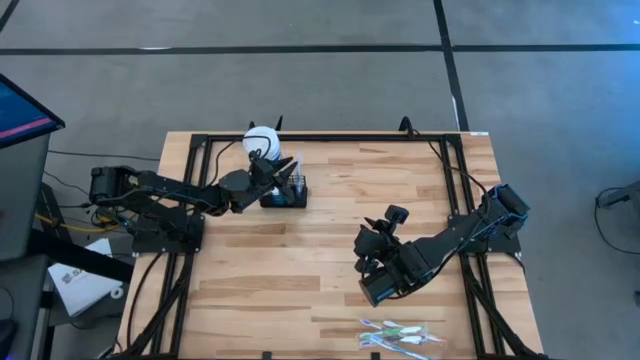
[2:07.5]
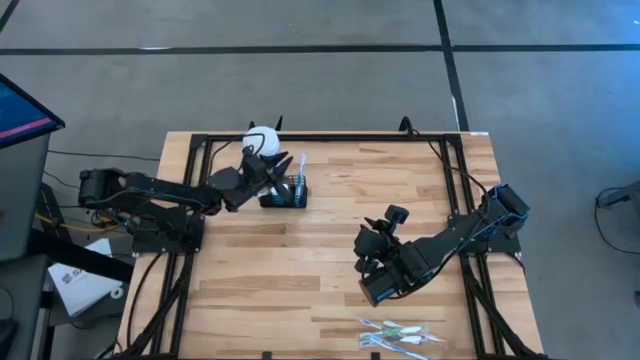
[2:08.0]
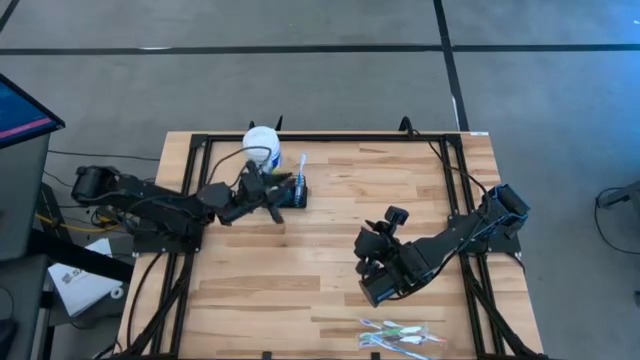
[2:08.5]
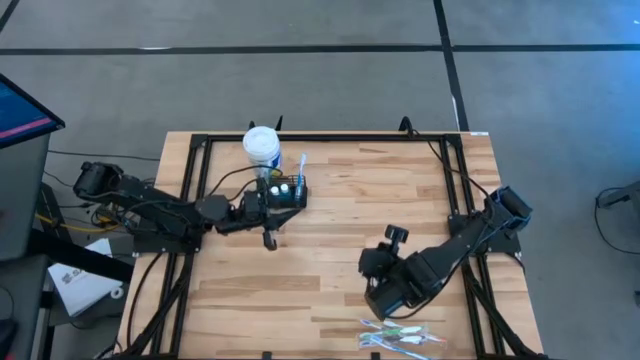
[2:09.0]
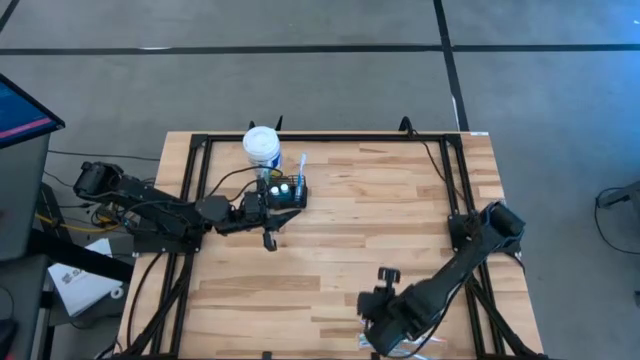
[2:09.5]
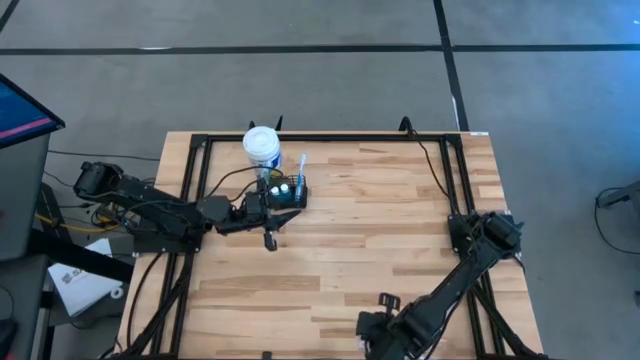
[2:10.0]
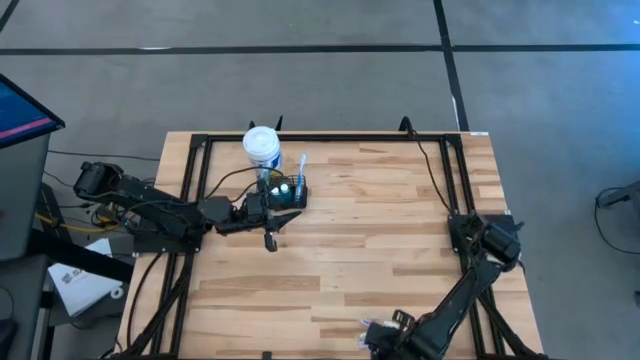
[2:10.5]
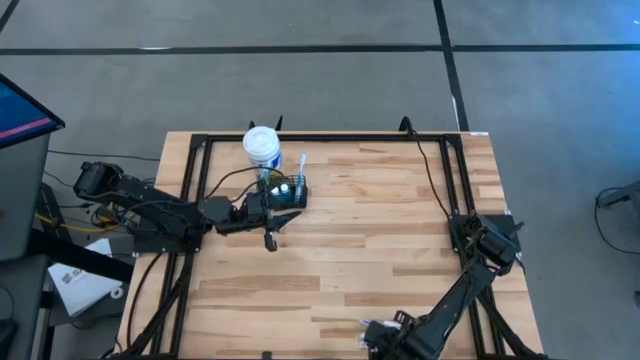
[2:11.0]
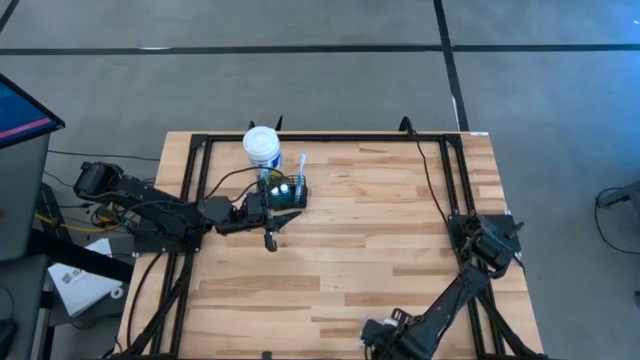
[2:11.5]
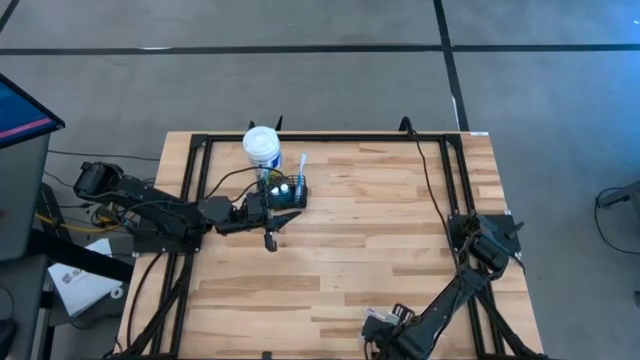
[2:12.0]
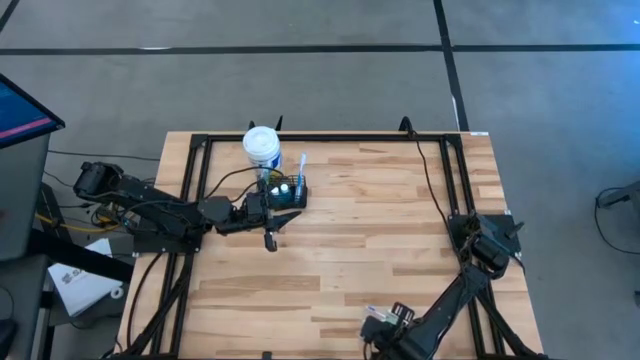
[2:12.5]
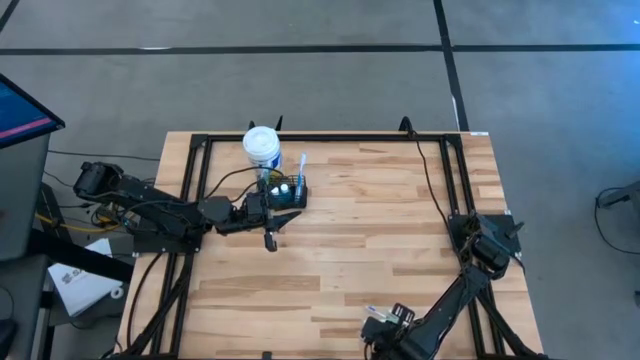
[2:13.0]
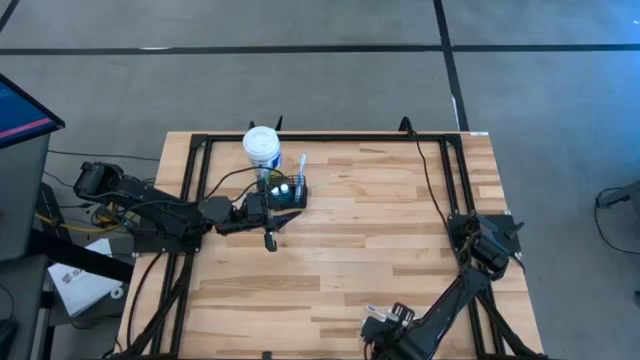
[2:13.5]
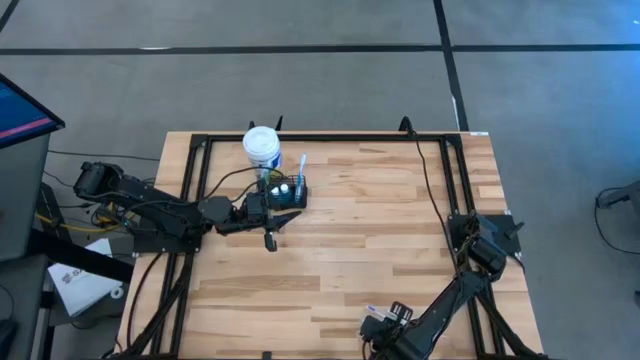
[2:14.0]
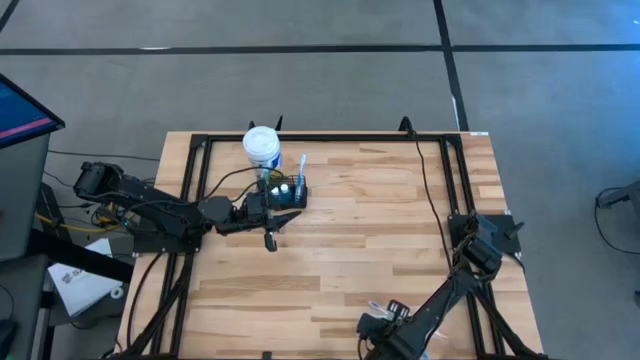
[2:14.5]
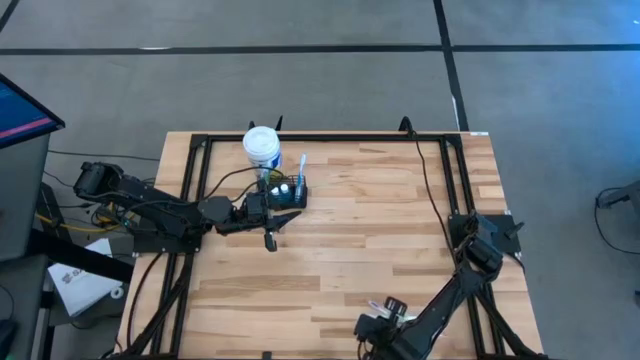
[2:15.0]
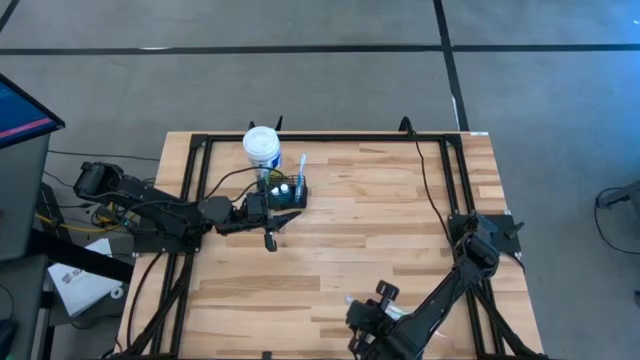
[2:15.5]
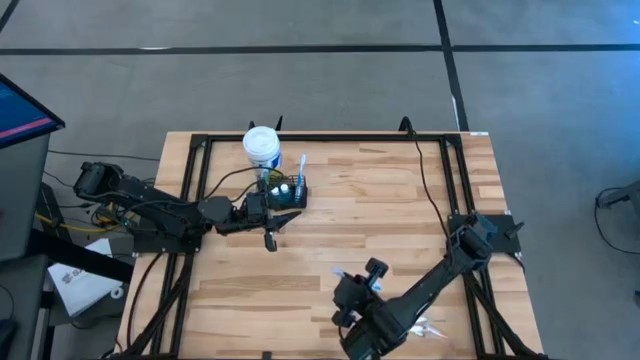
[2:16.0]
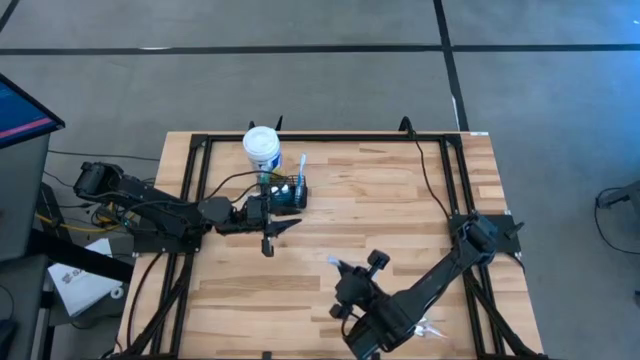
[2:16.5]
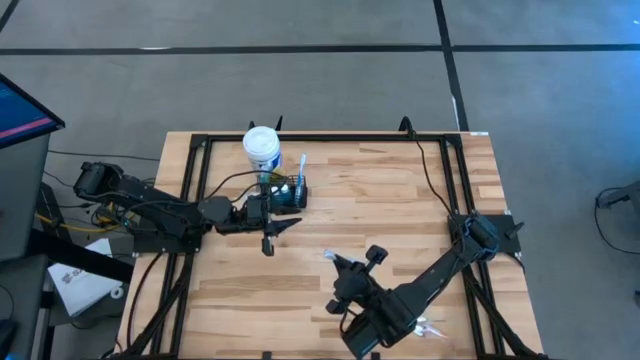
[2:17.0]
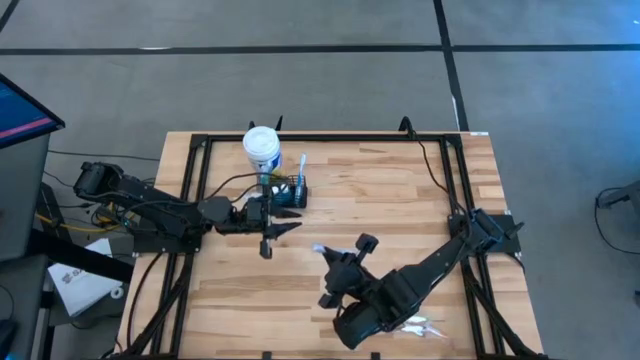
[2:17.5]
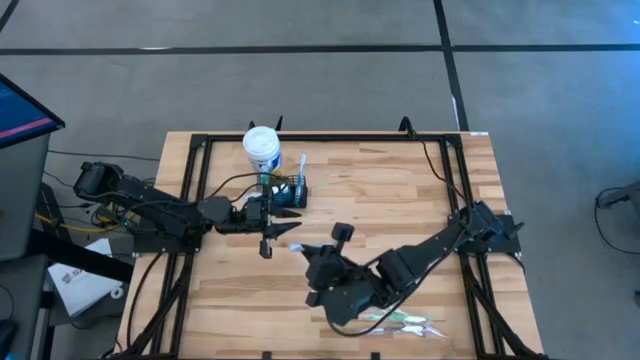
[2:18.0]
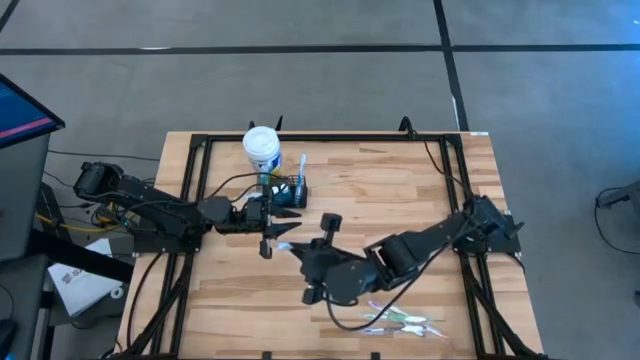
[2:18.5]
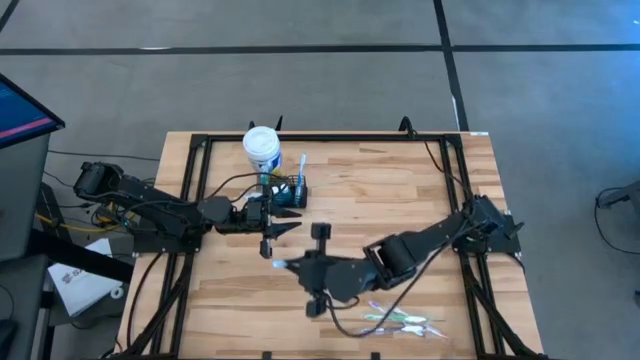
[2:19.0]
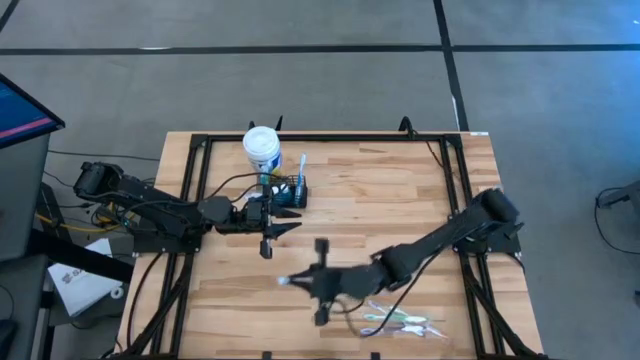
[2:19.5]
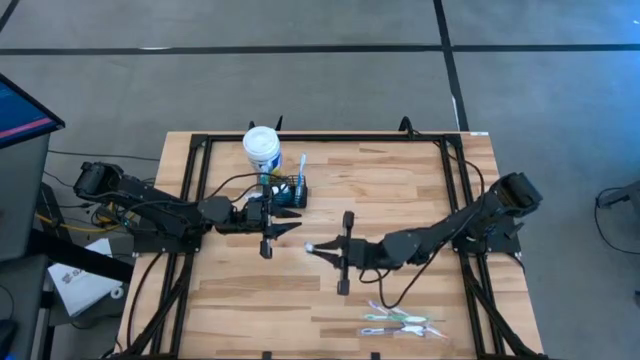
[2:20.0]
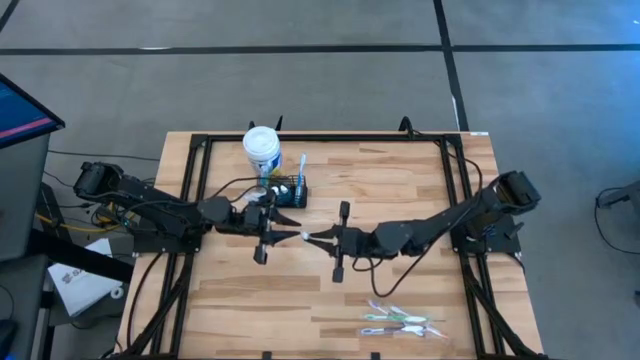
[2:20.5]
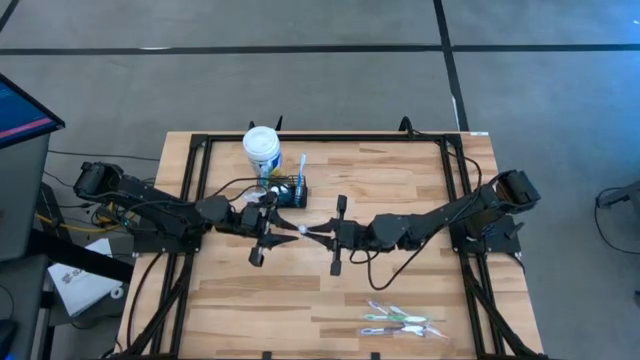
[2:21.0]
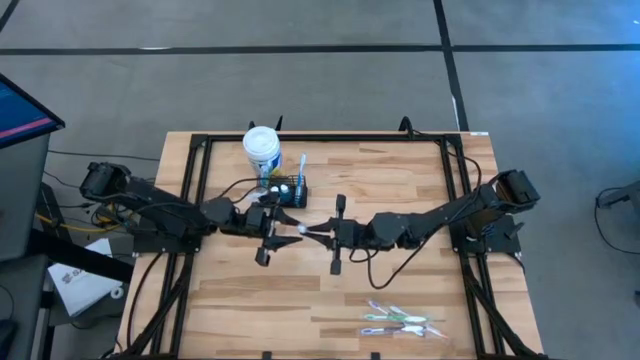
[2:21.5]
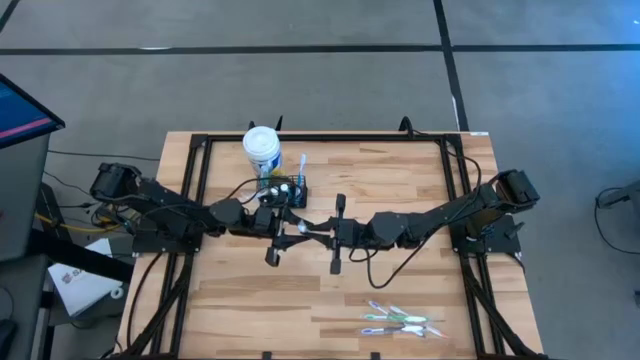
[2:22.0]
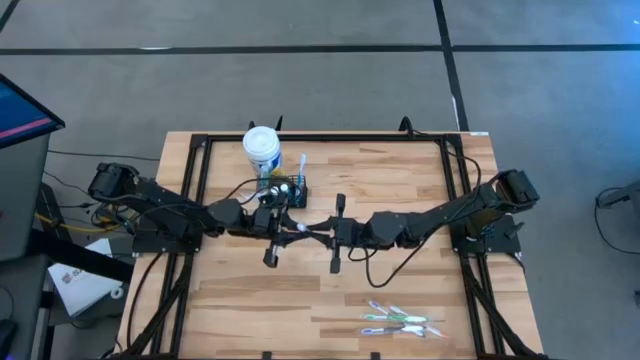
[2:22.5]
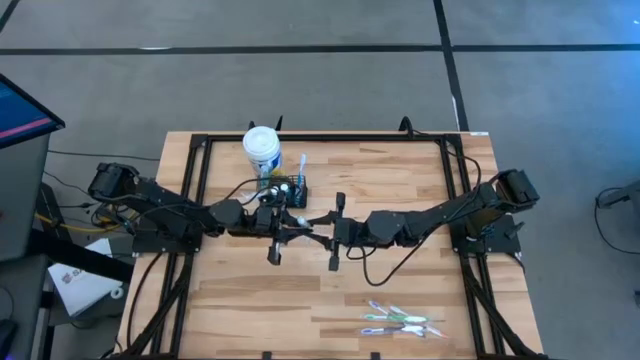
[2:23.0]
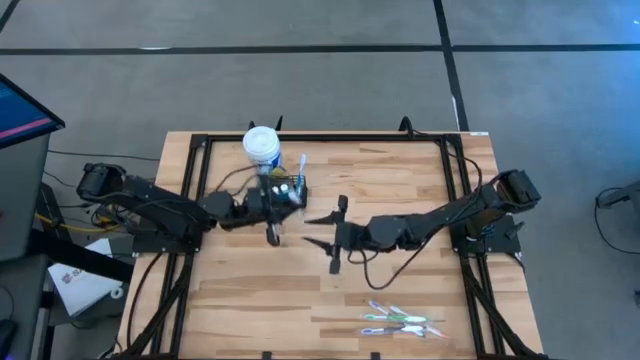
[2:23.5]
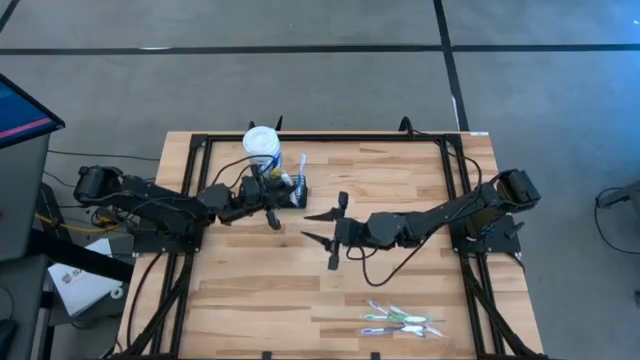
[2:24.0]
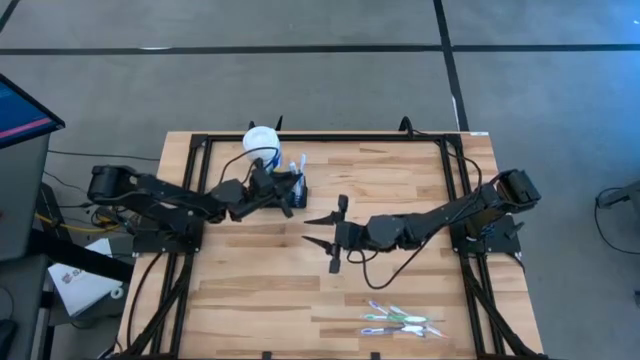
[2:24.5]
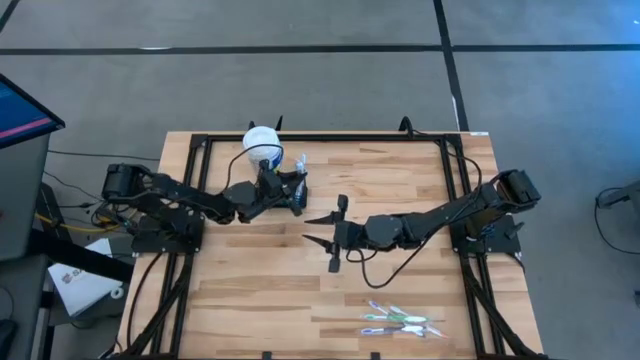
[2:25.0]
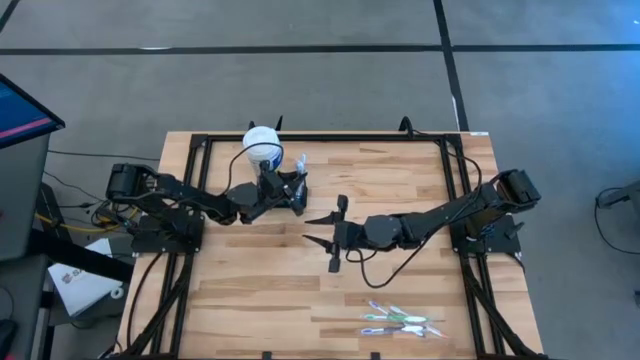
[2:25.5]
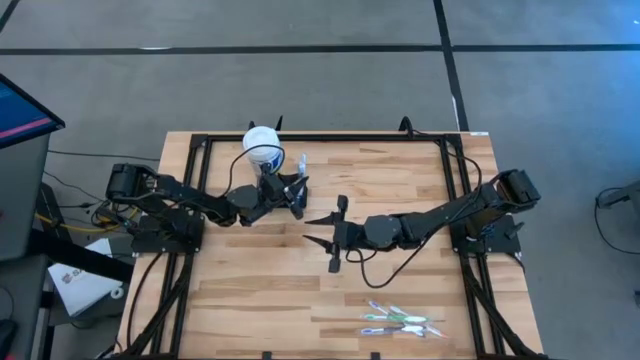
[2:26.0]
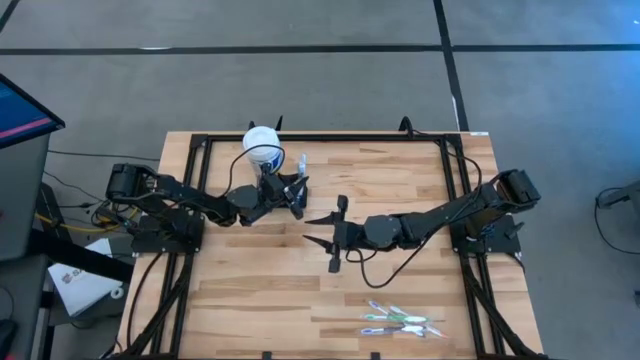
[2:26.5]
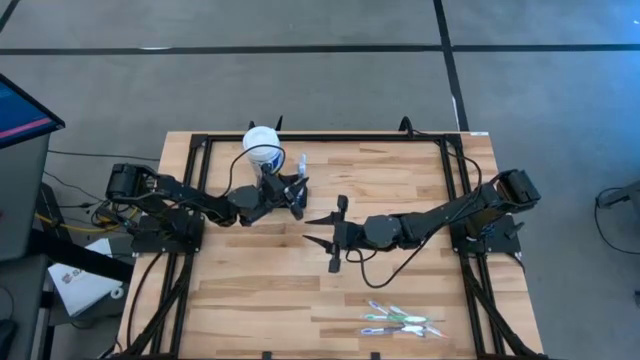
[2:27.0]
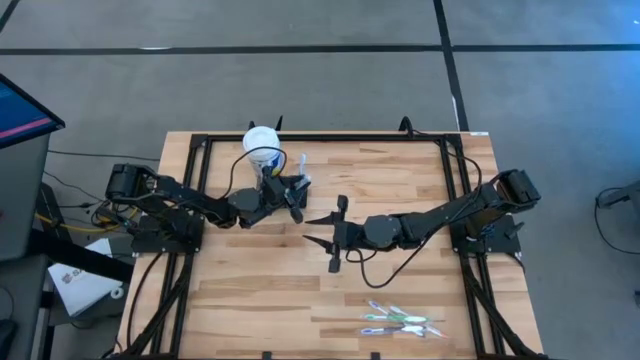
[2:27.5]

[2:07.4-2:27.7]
Task: Pick & Place toothbrushing station
Put the blue toothbrush into the wire organizer
